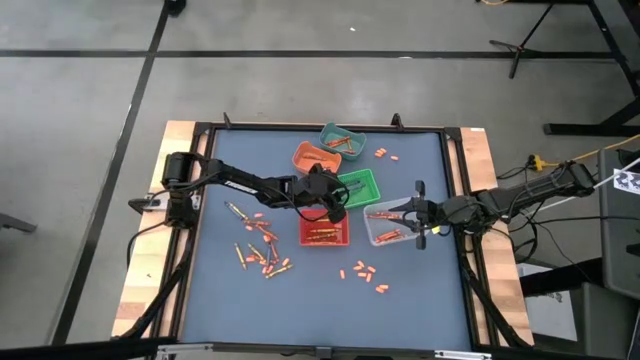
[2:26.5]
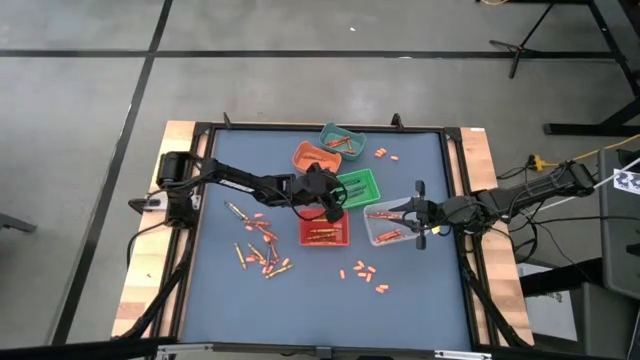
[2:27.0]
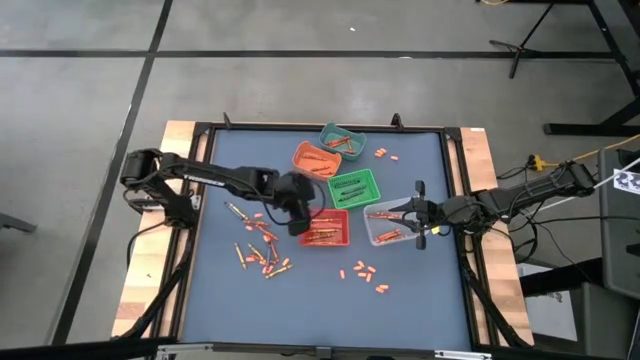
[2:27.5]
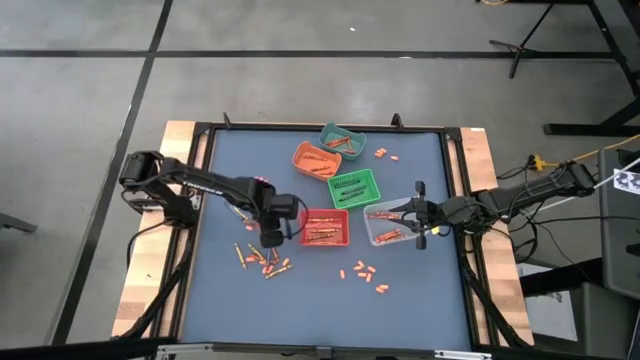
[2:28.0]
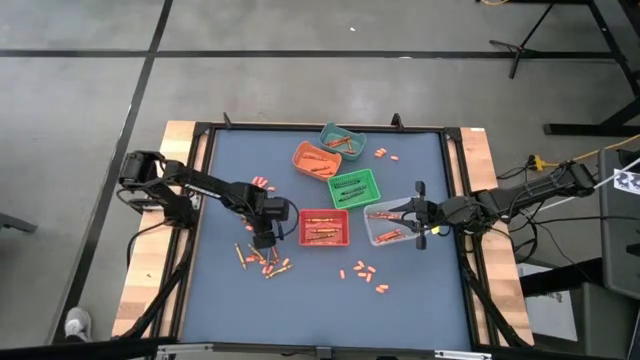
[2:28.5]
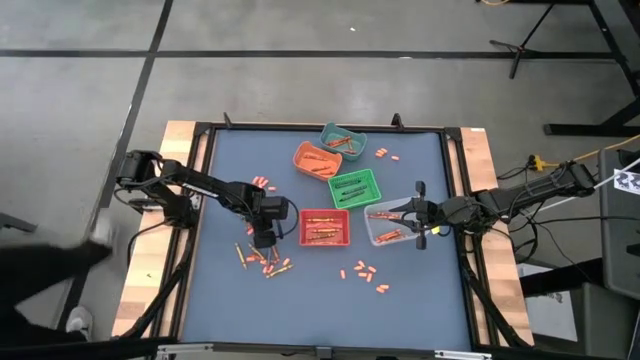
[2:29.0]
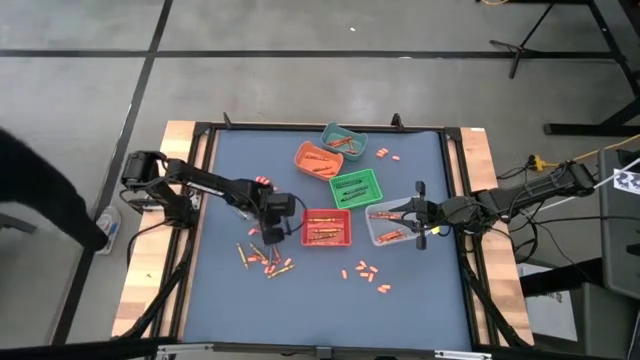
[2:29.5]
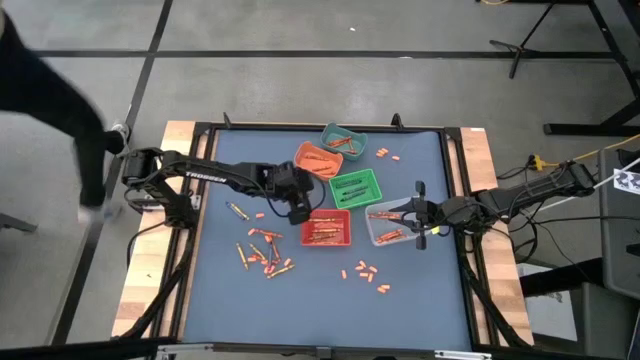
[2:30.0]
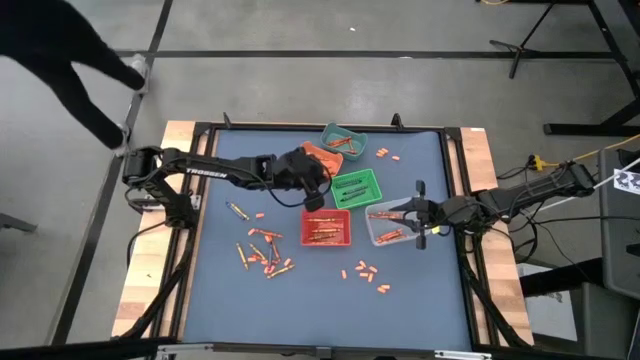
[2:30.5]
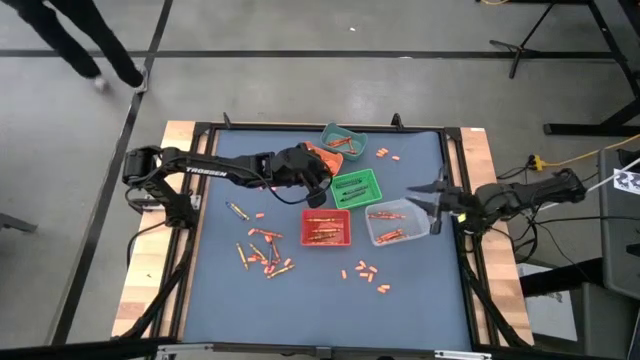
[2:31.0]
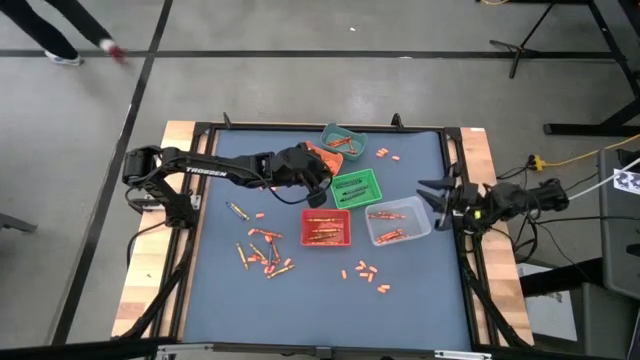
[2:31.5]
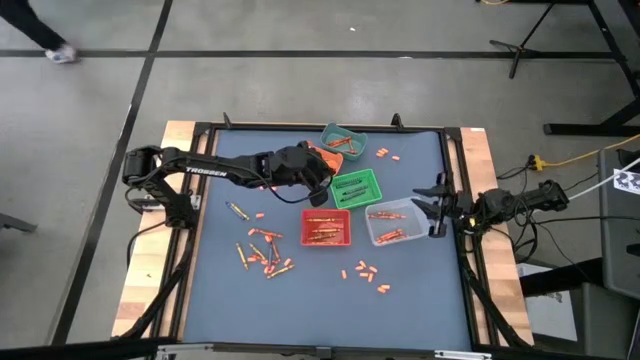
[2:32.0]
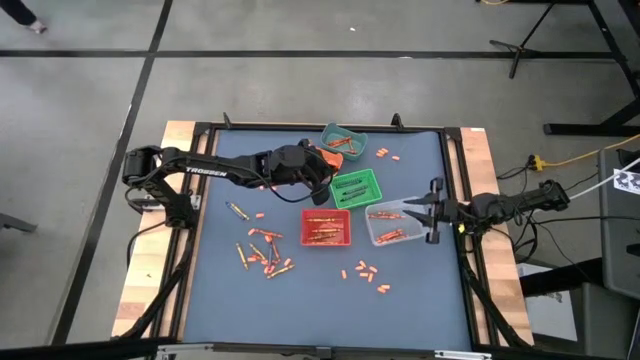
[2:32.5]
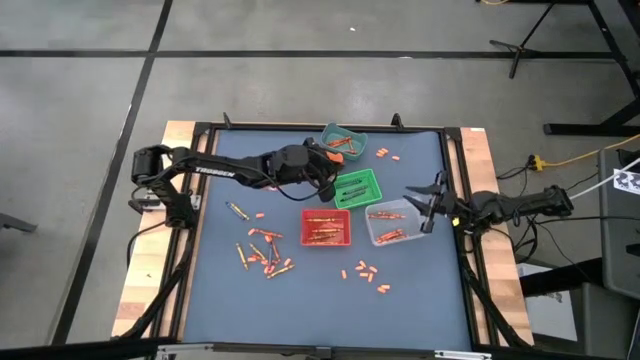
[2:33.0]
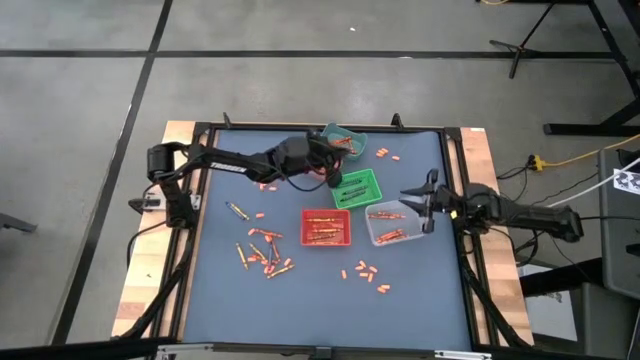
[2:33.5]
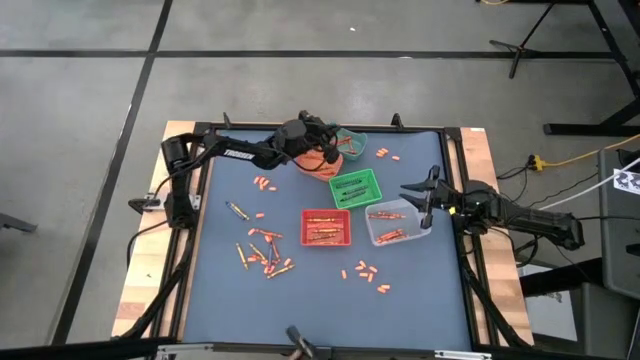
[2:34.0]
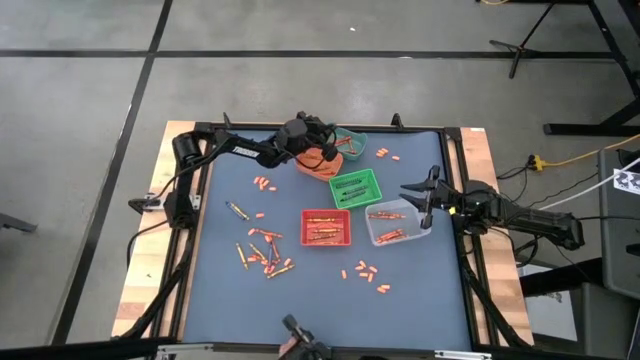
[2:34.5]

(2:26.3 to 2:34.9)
Task: Sort crayons
Put the red orange crayon into the blue bin

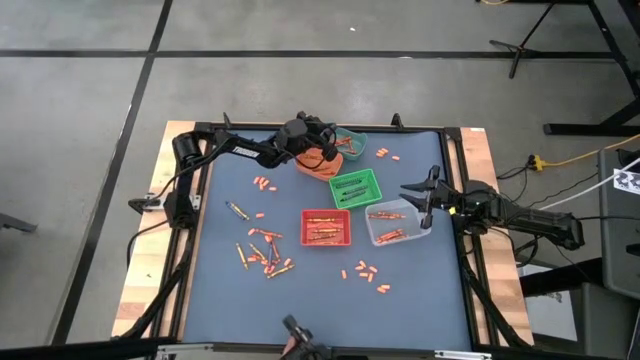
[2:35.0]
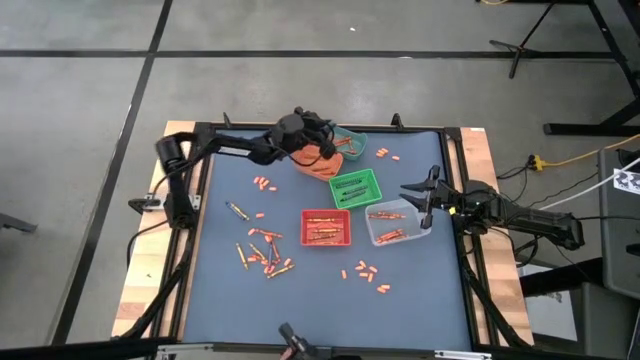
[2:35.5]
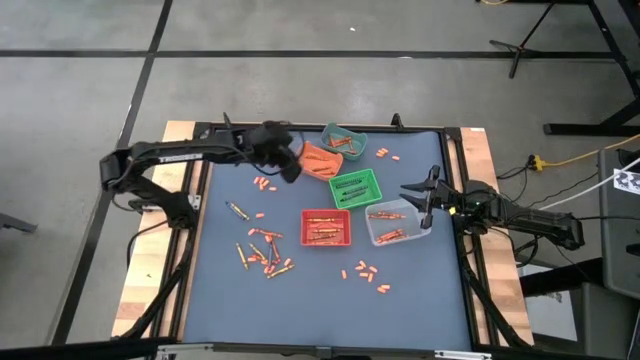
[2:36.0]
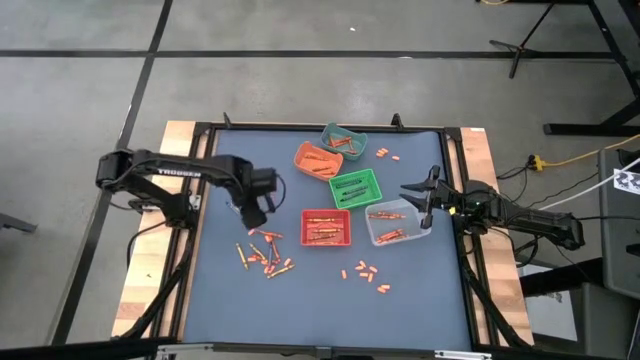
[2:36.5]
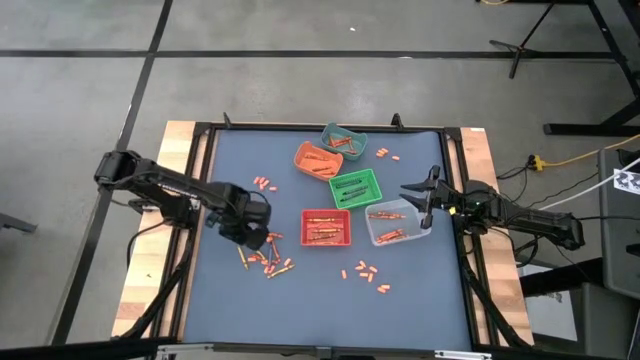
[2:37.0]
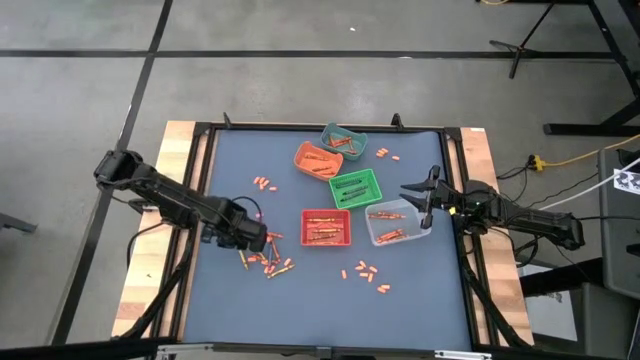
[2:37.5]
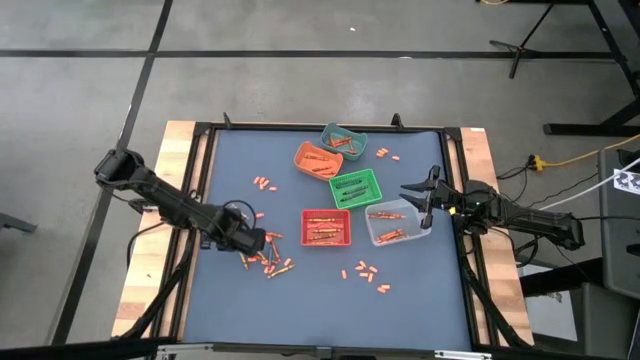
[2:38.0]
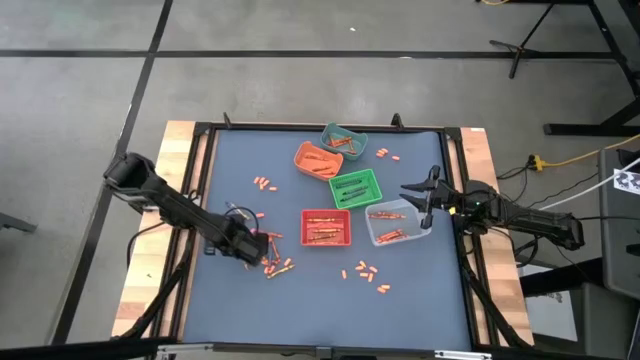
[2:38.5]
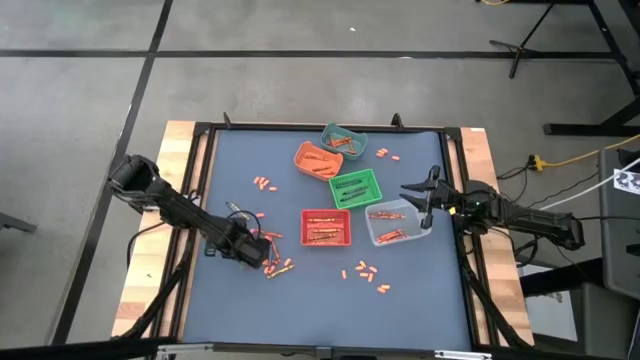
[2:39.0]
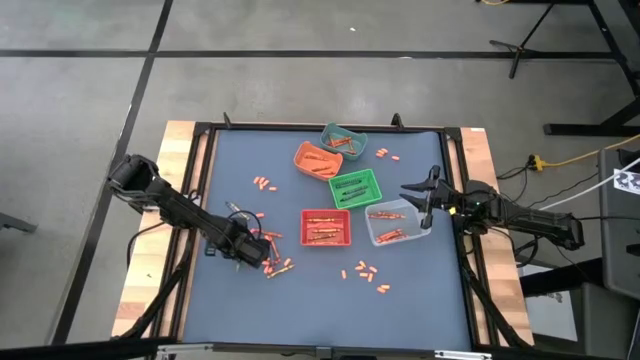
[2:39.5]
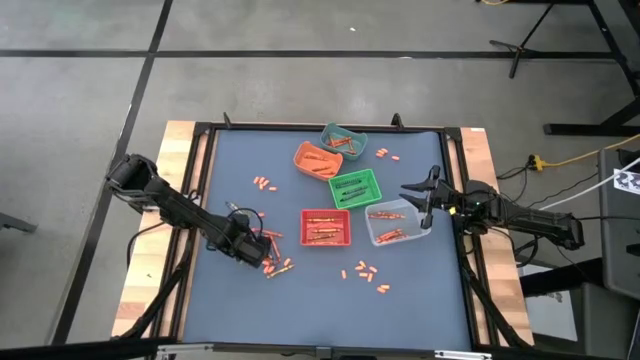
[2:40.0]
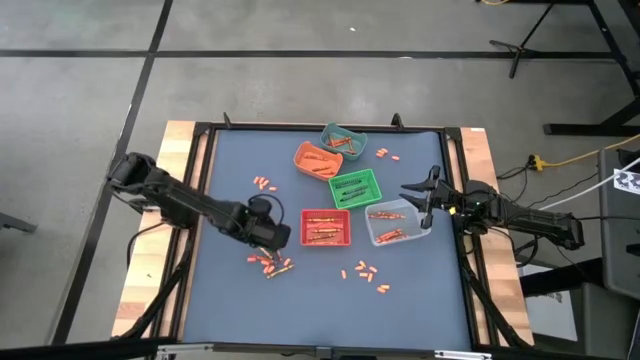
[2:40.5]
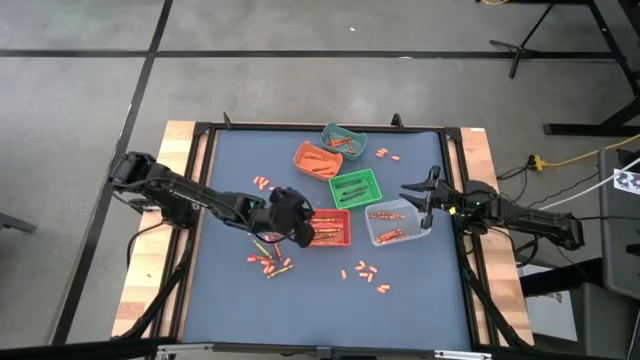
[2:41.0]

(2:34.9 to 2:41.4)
Put the yellow crayon into the red bin

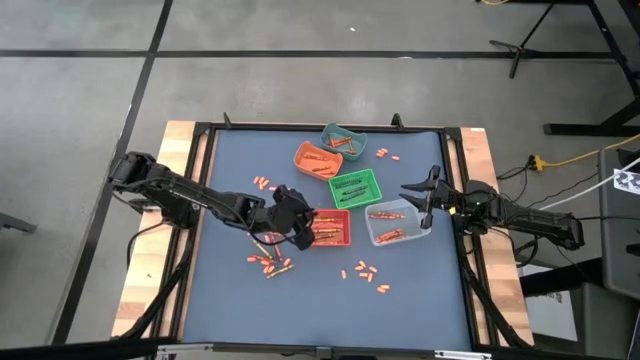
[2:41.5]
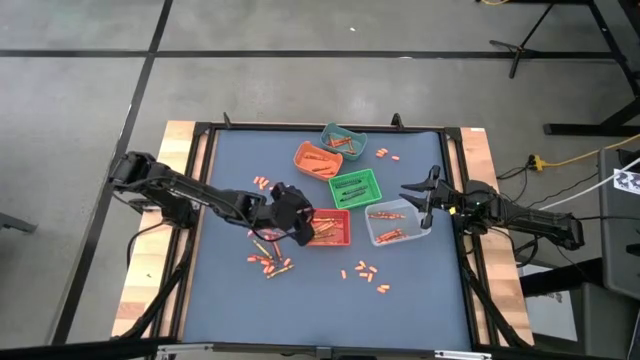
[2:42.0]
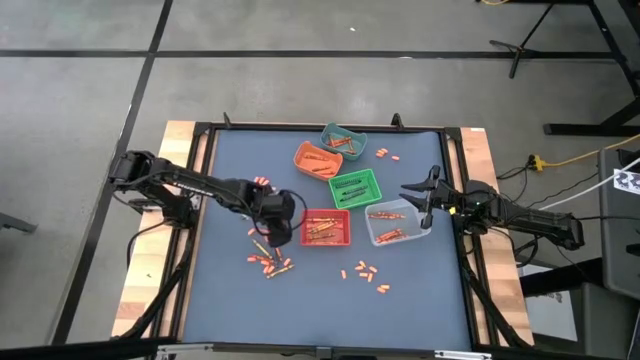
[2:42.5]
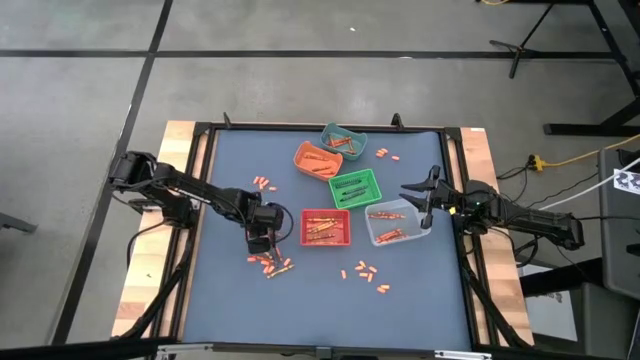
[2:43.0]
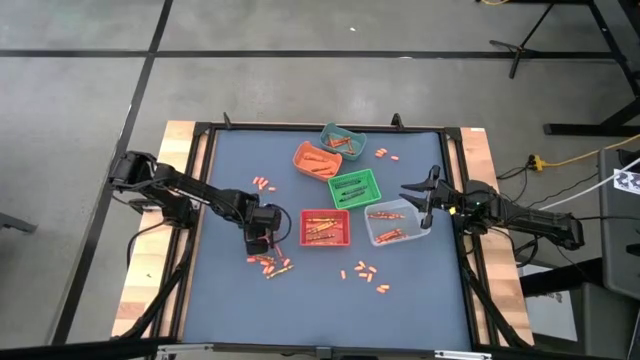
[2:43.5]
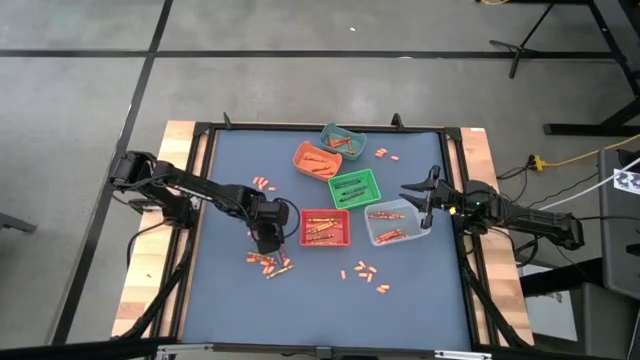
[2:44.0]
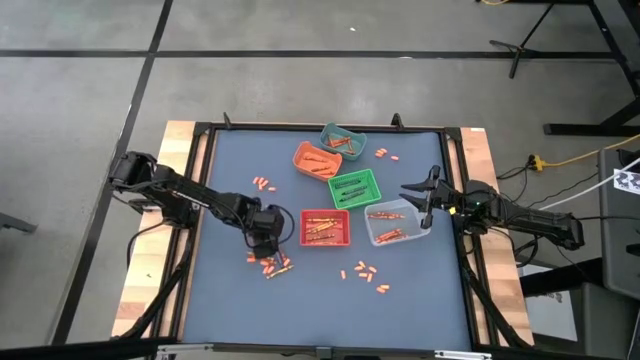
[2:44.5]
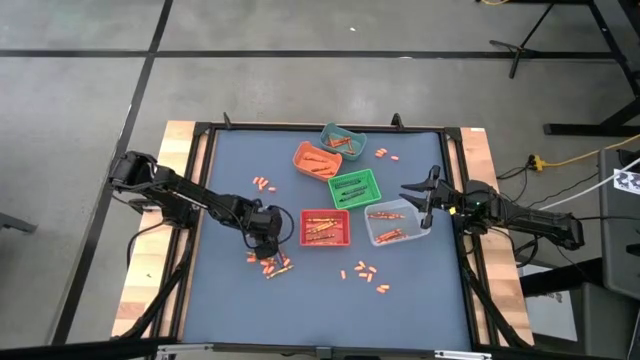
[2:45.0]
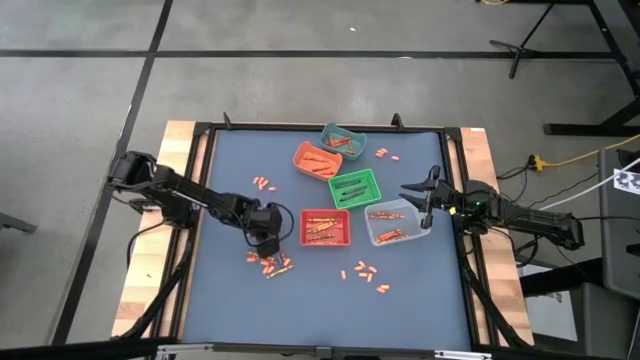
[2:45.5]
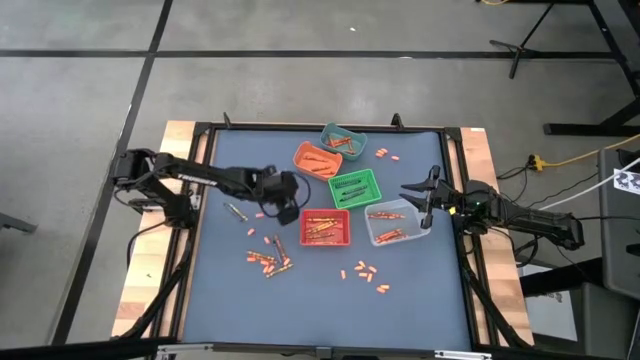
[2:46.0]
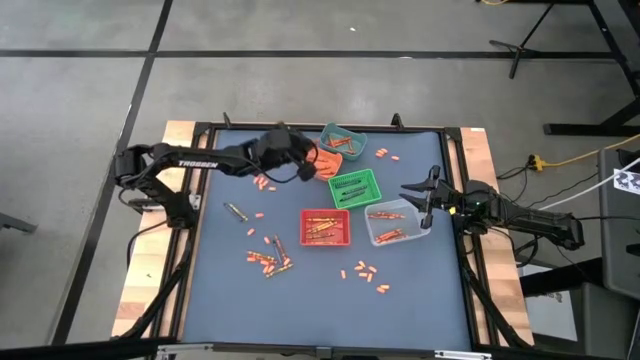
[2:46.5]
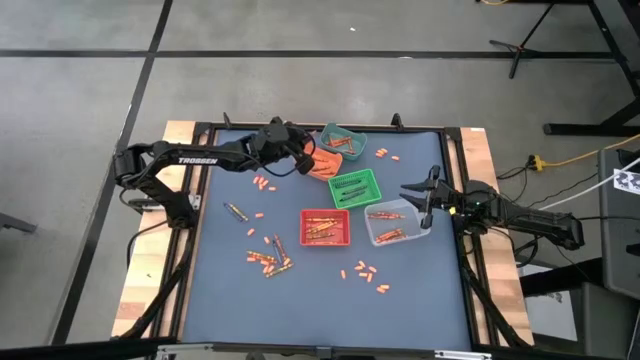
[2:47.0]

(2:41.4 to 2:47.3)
Put the orange crayon into the orange bin

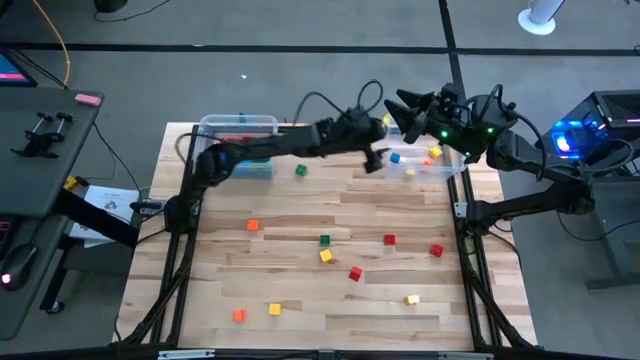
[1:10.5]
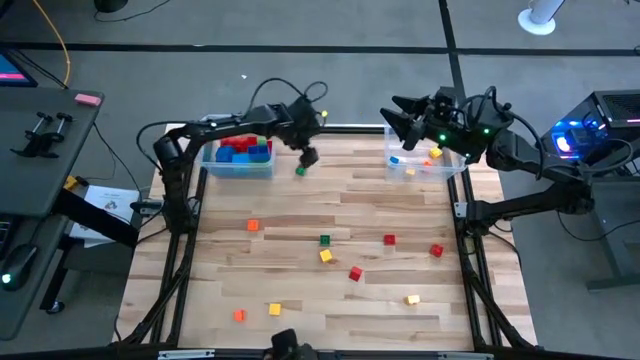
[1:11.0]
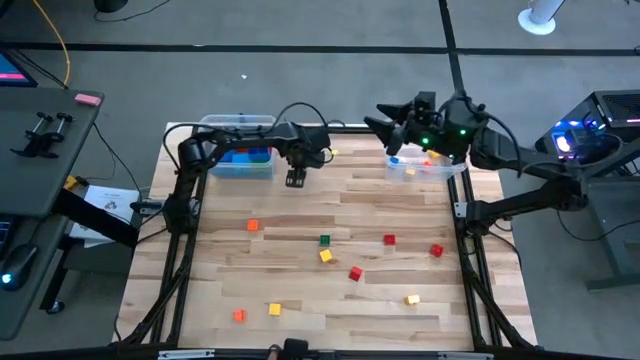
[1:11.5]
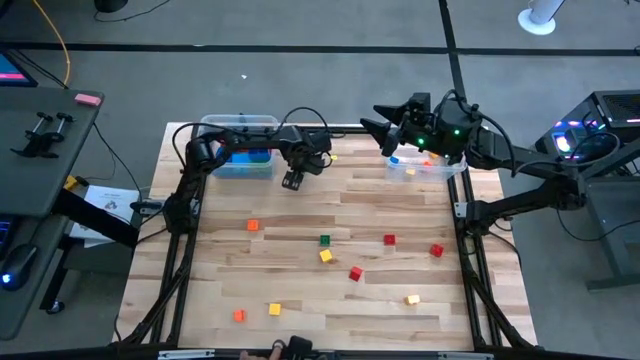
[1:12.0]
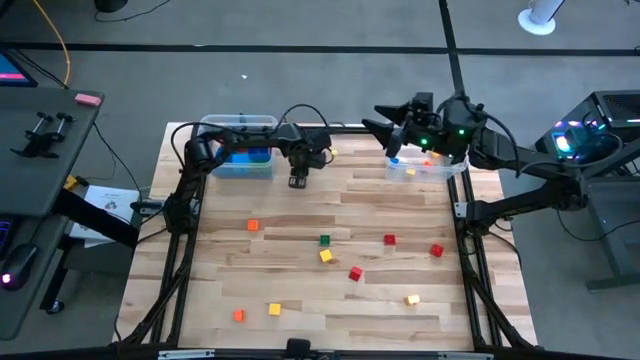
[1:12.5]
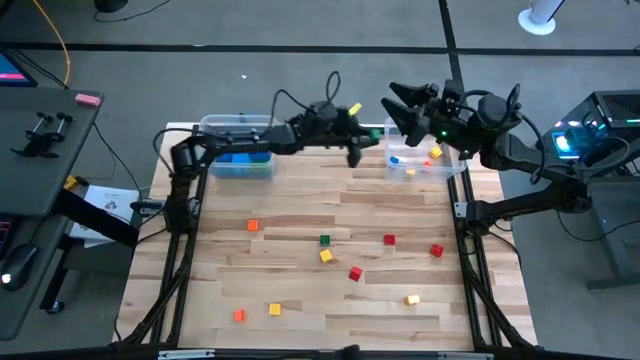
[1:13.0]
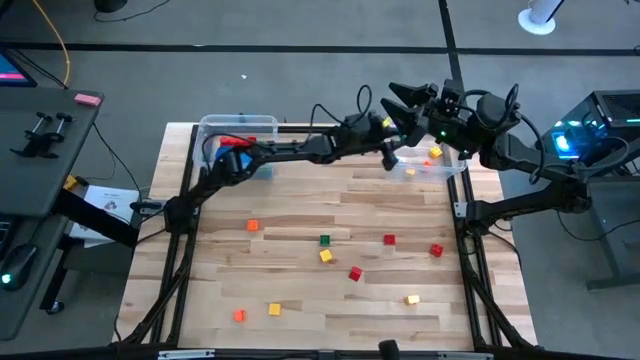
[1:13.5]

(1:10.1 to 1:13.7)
Task: Sort blocks by size
Put the small game piece into the right transparent bin
